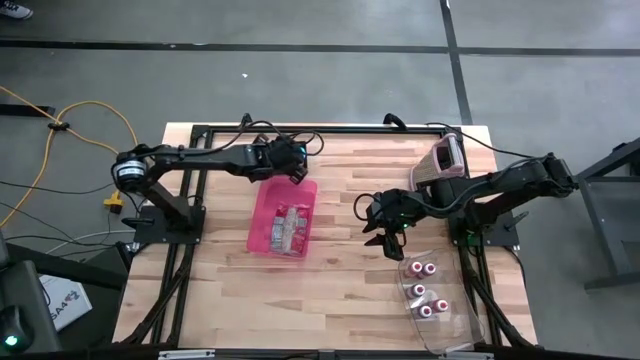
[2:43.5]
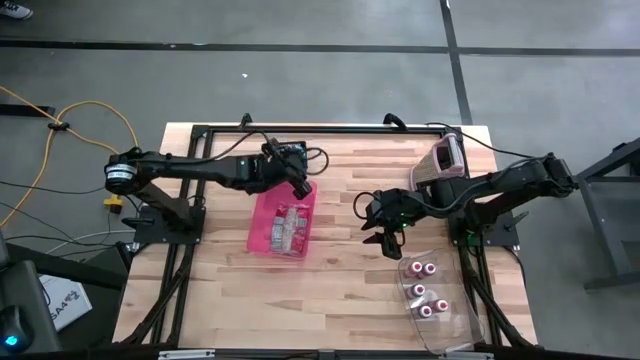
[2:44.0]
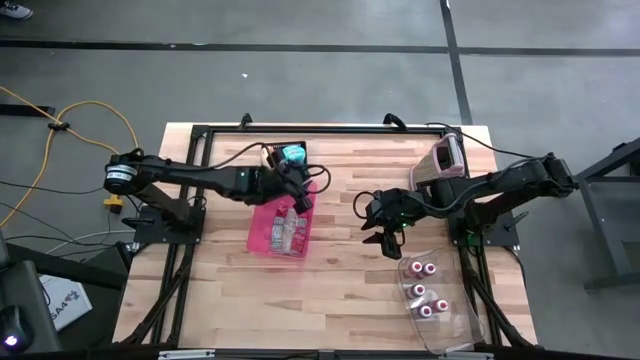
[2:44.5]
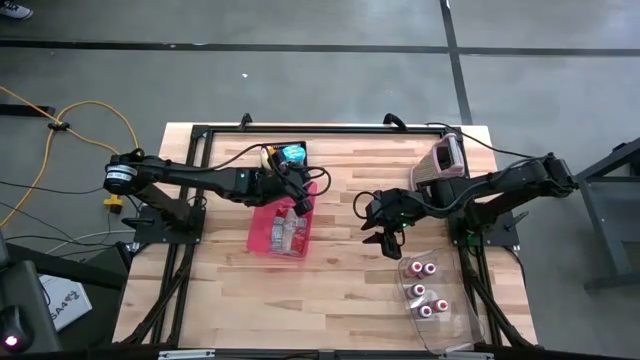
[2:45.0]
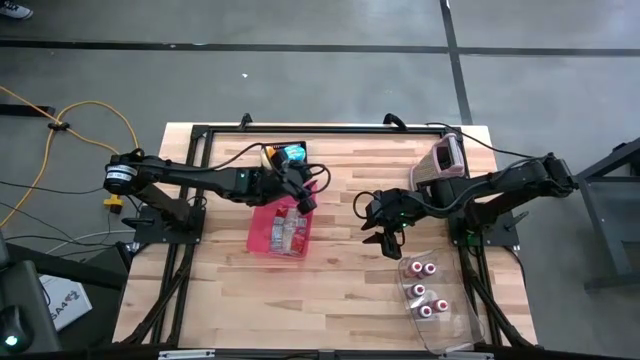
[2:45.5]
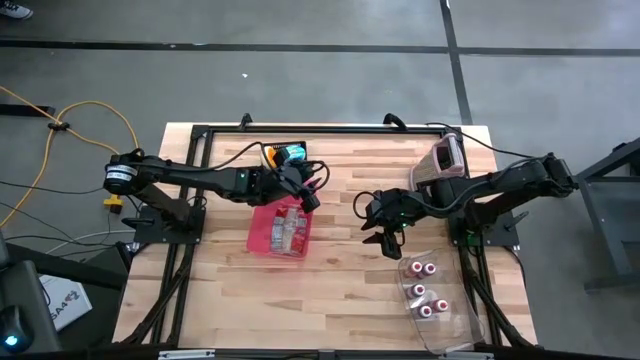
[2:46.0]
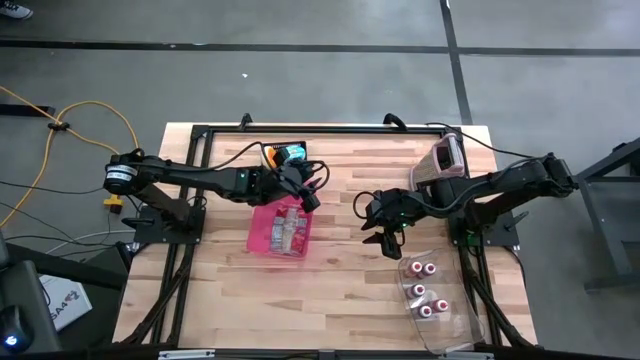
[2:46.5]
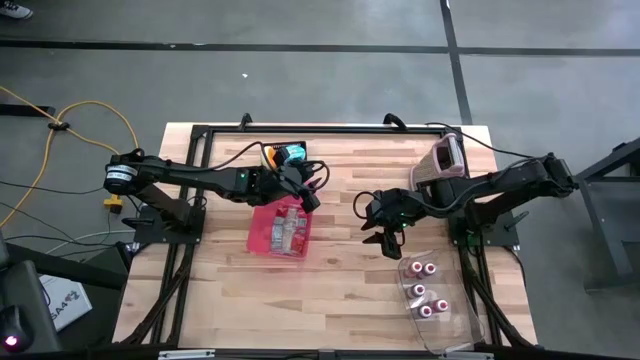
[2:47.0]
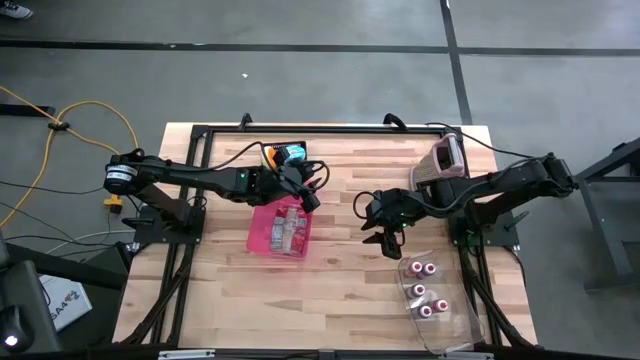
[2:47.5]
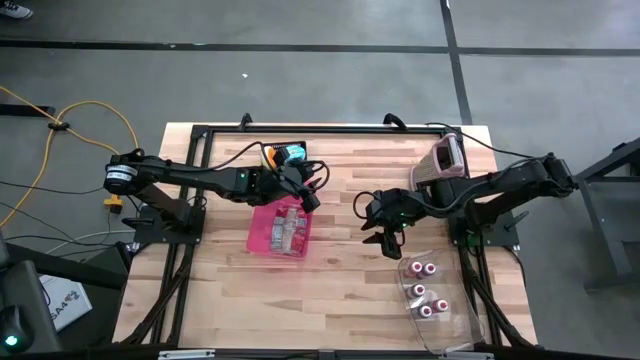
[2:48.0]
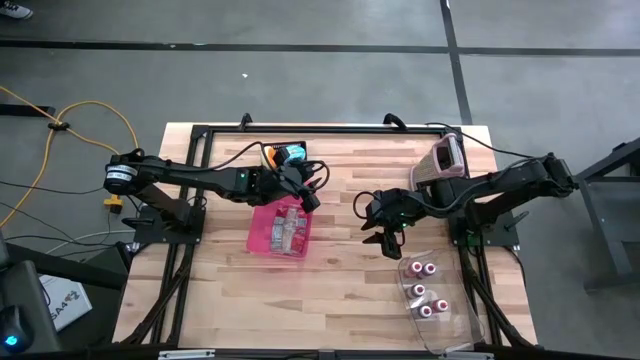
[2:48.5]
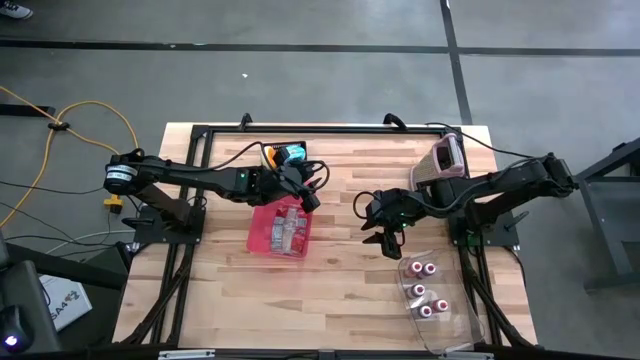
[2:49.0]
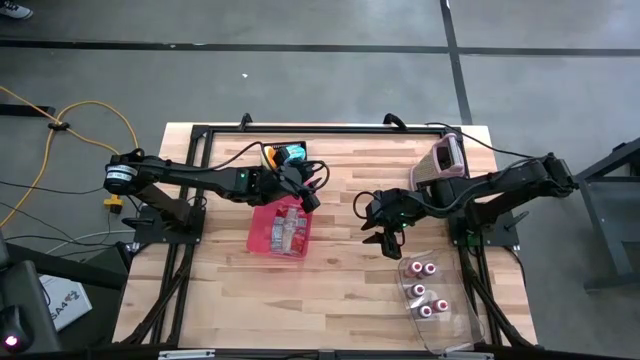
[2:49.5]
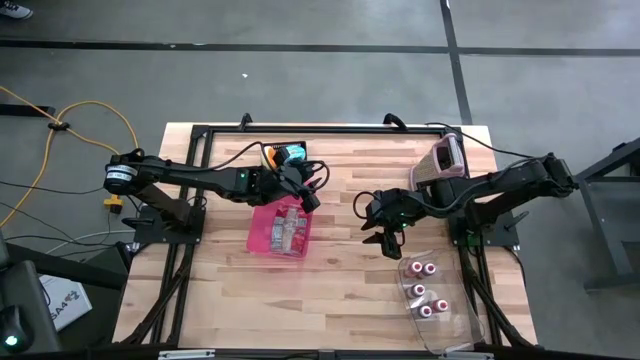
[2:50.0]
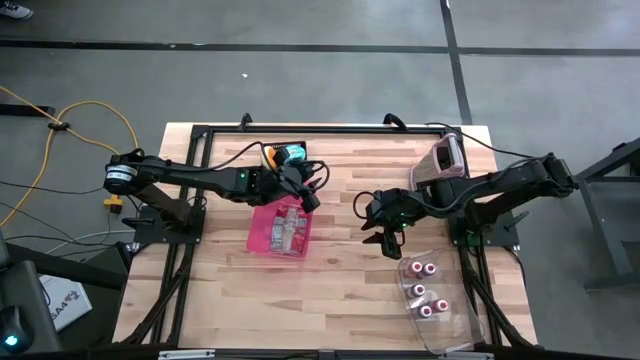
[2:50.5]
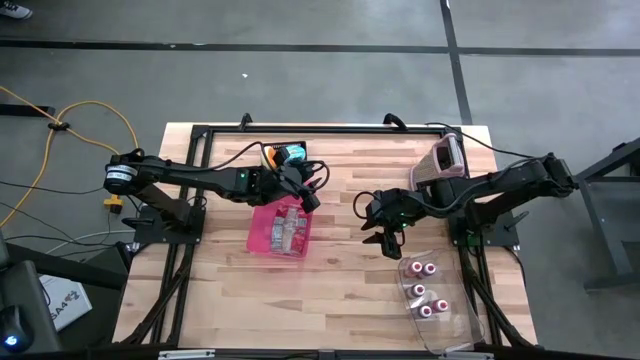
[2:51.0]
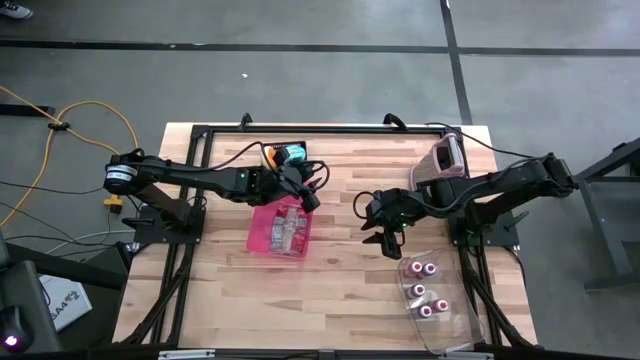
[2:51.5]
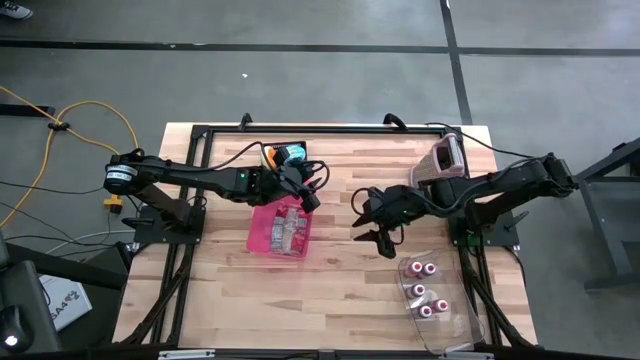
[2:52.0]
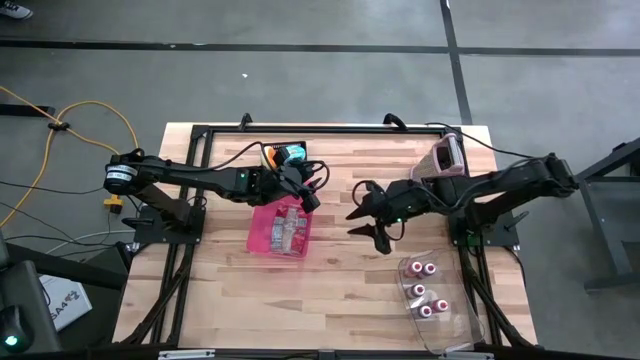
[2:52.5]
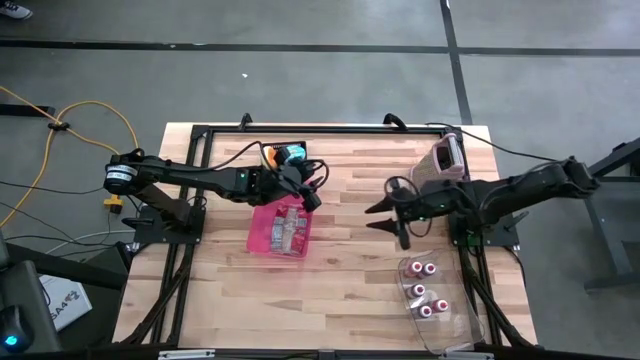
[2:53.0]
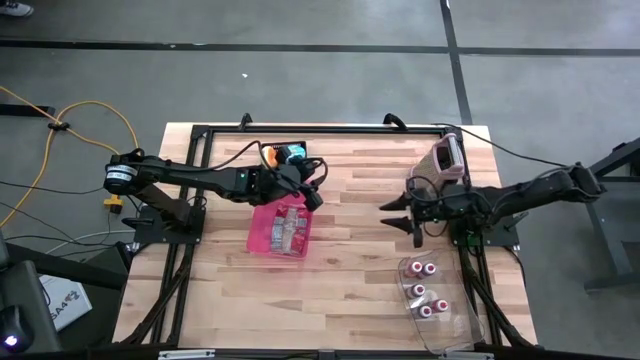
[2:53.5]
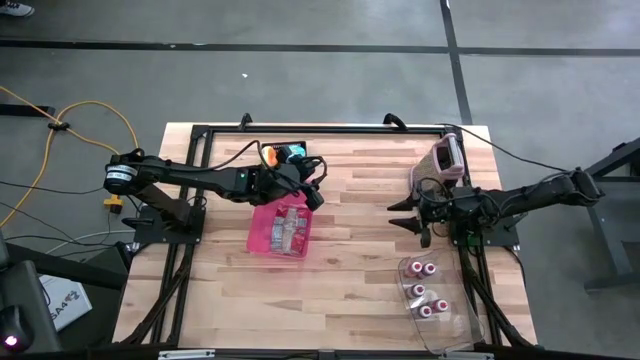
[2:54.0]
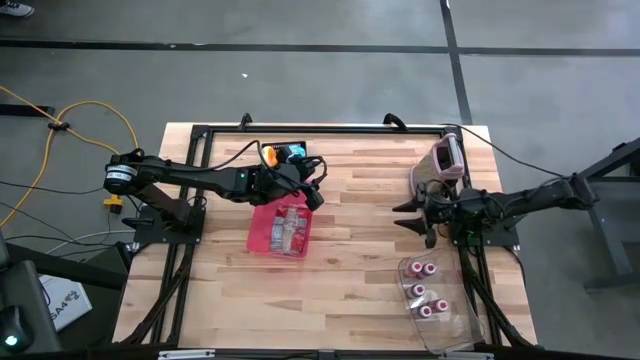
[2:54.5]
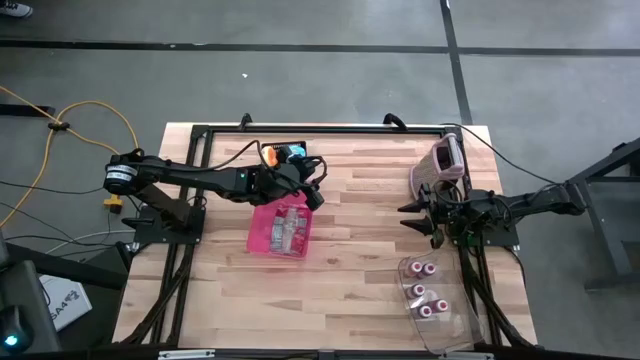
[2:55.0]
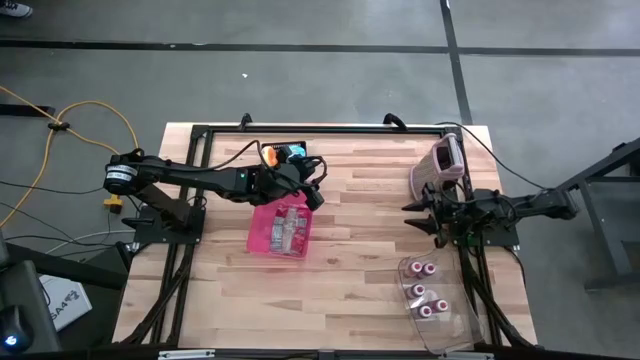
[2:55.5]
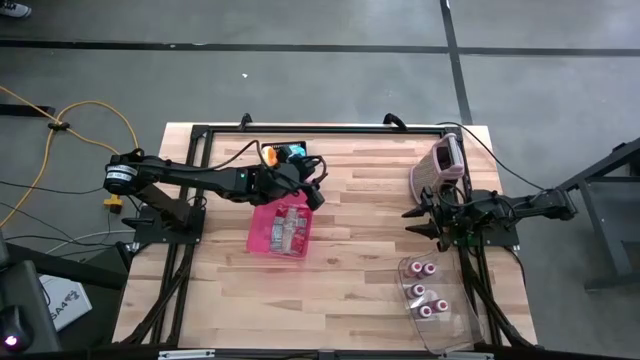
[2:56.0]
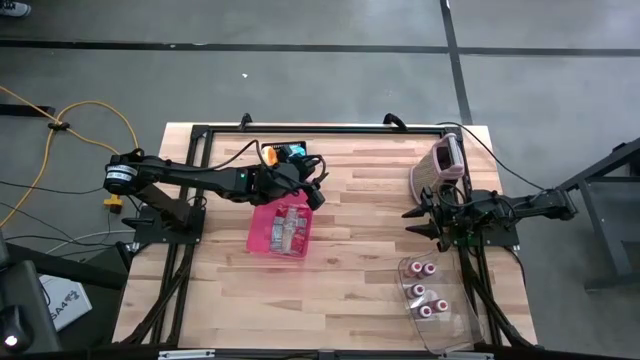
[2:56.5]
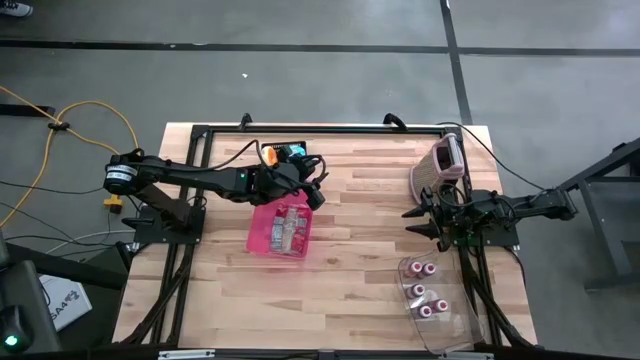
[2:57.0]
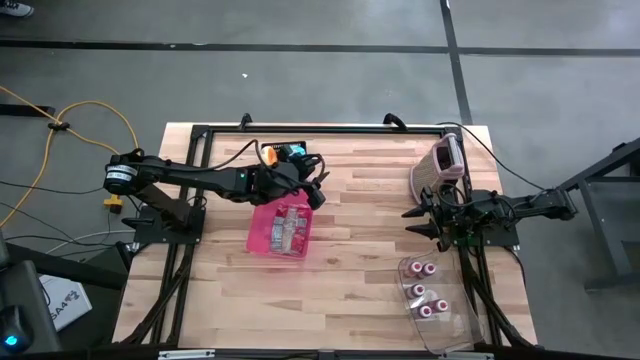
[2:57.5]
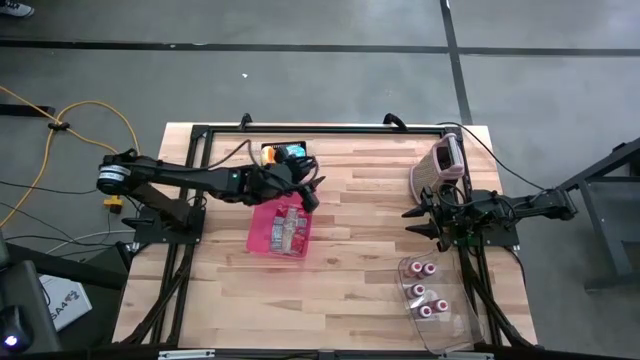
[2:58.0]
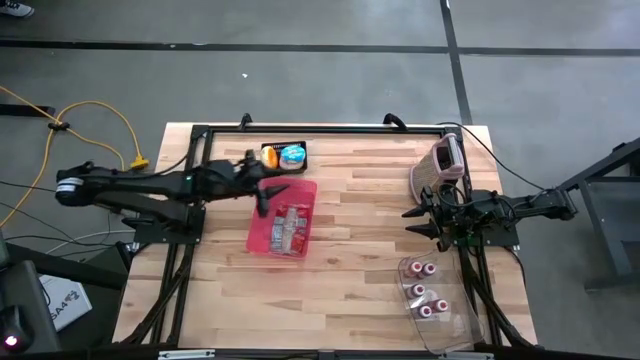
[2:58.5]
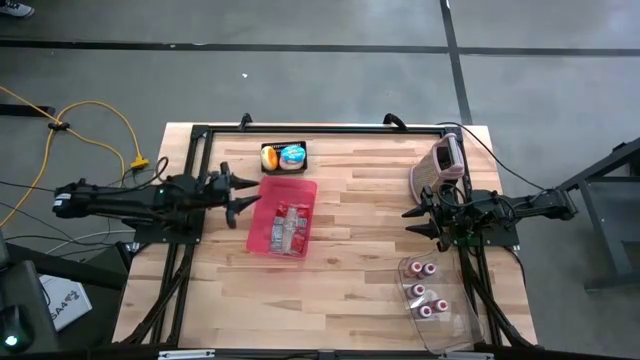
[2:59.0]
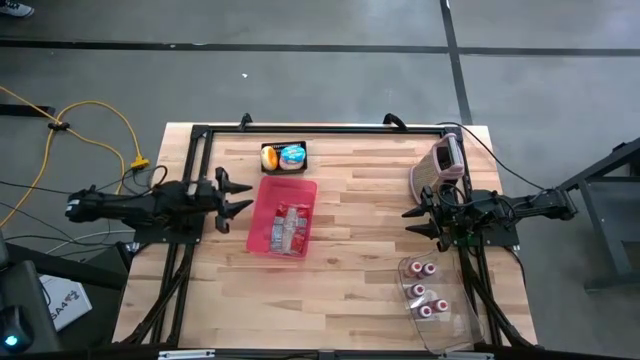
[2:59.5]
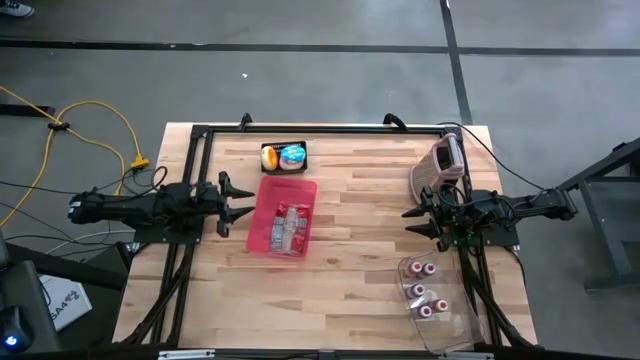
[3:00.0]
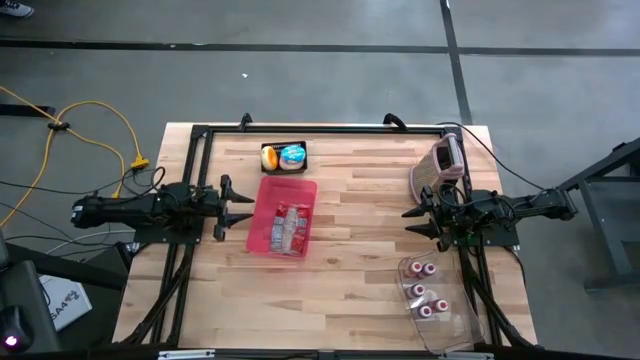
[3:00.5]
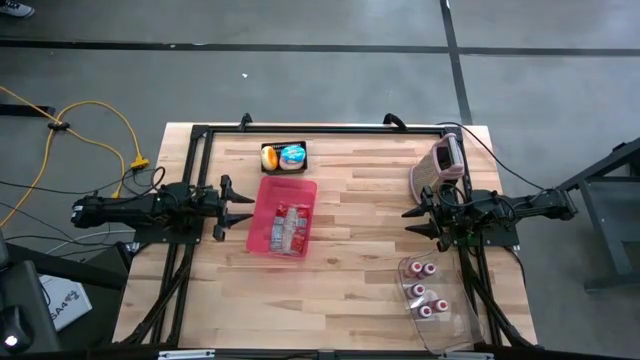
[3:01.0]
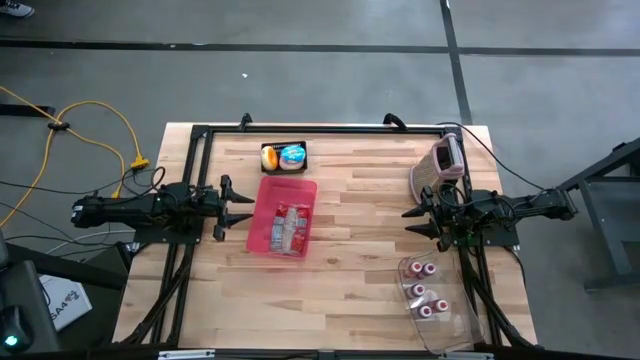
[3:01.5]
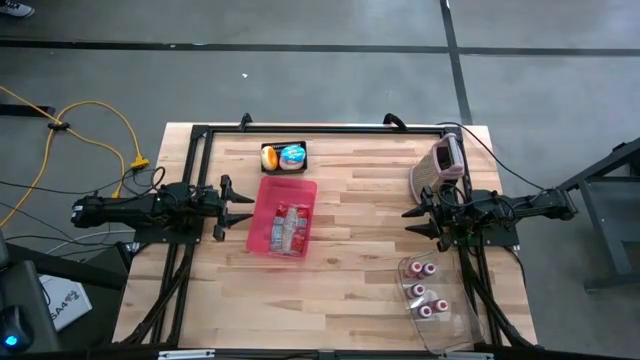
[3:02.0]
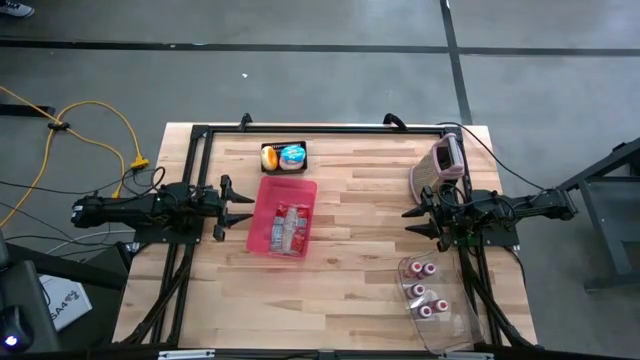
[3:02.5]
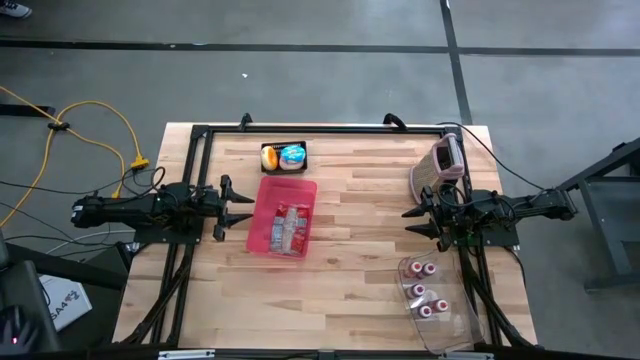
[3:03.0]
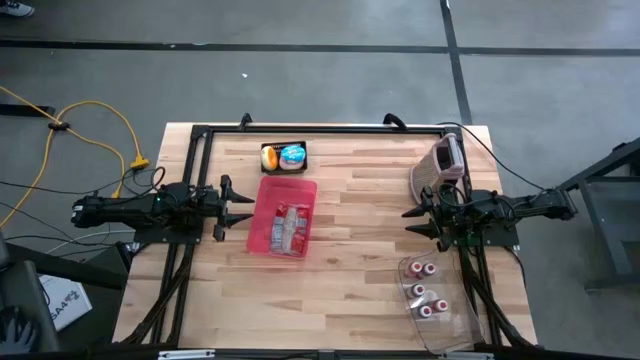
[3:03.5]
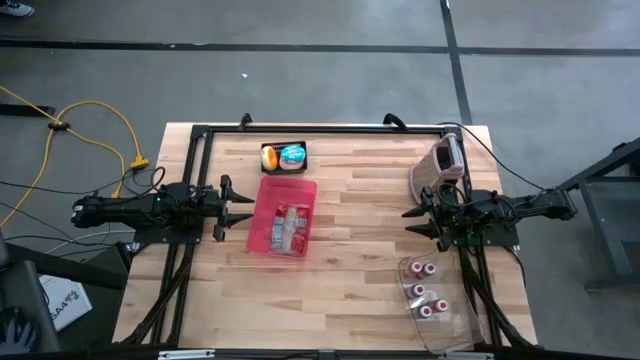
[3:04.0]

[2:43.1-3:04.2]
Return to Home Position
